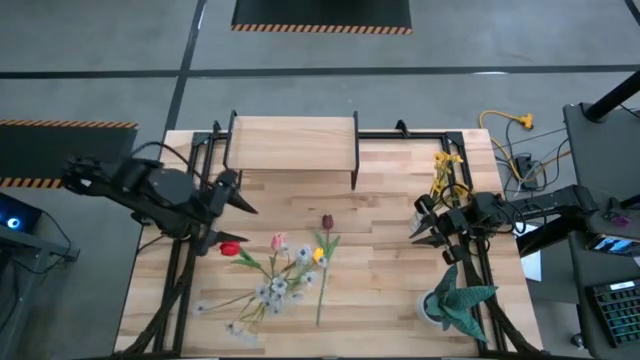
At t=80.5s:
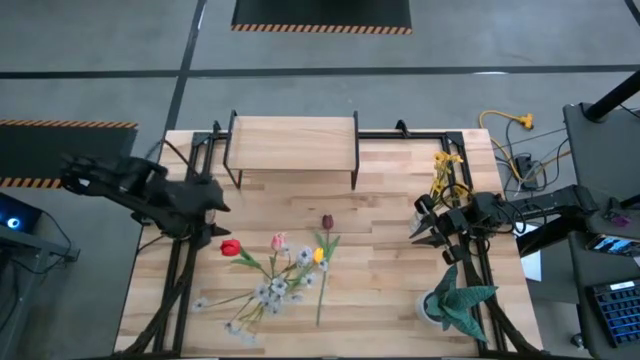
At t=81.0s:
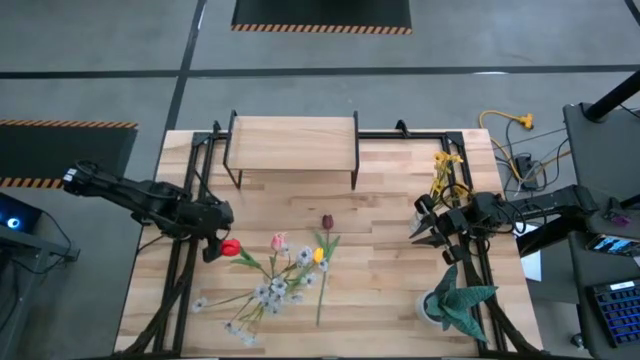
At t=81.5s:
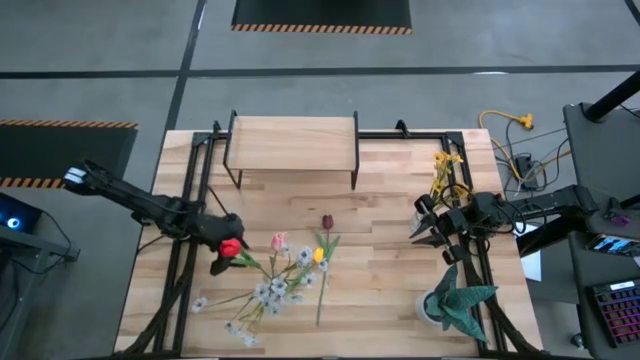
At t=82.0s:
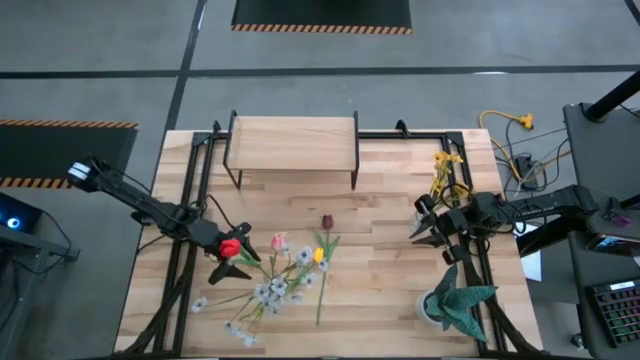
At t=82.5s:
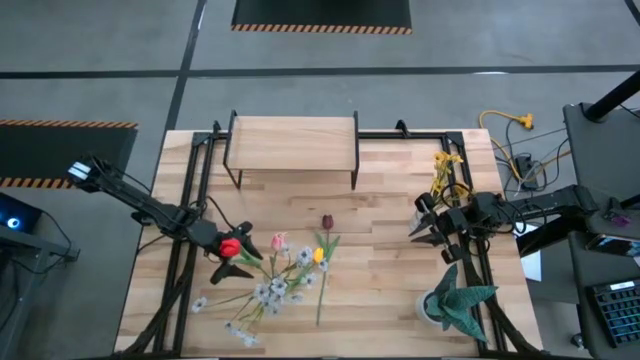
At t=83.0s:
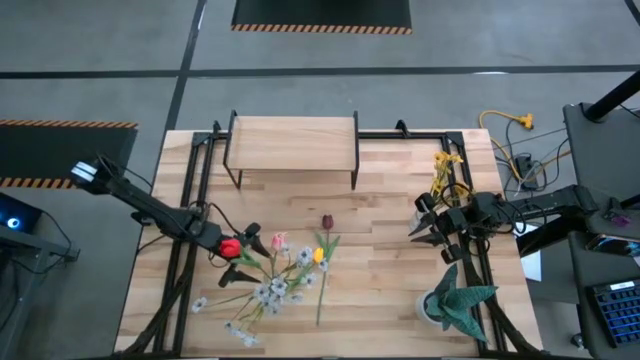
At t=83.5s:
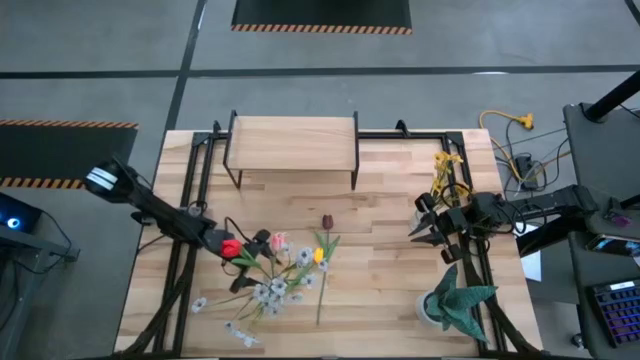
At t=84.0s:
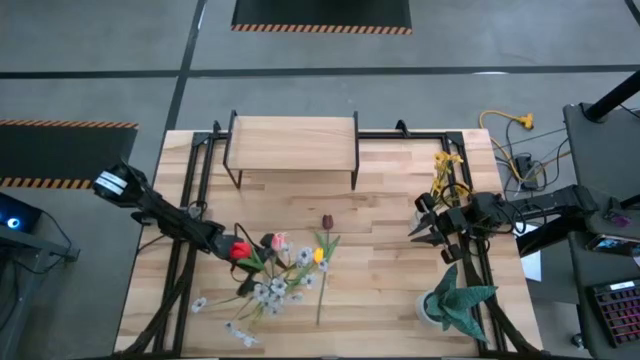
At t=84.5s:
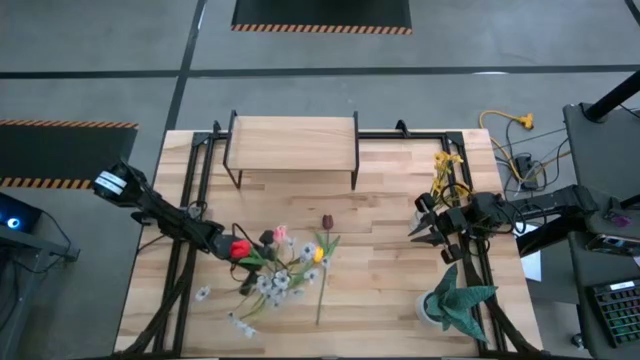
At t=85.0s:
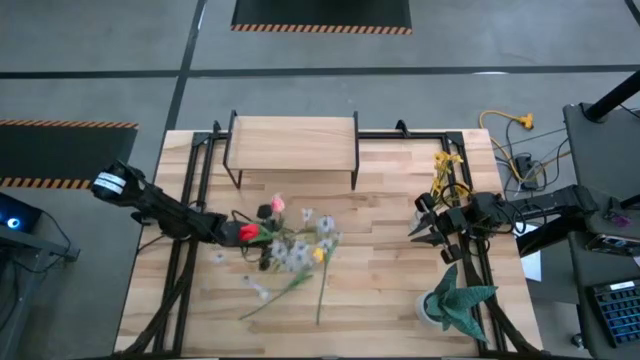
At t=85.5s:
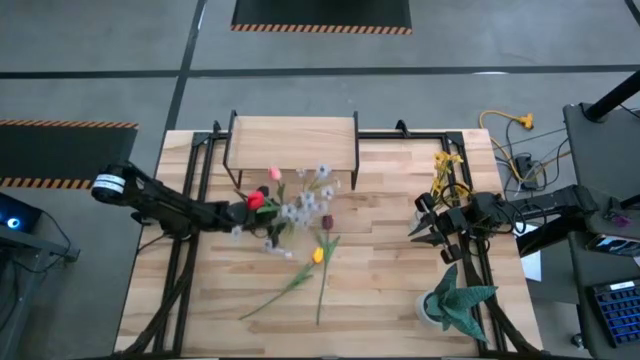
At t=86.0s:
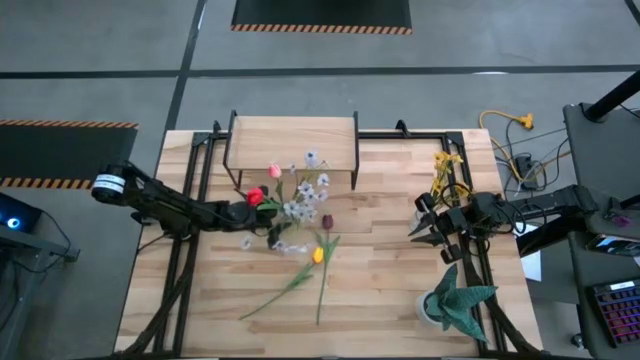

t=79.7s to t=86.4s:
Task: Pick and place flowers into a vace then onto a shelf
Move the left transparent vase to the center

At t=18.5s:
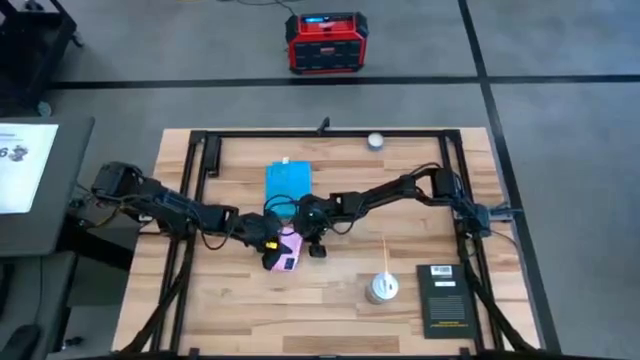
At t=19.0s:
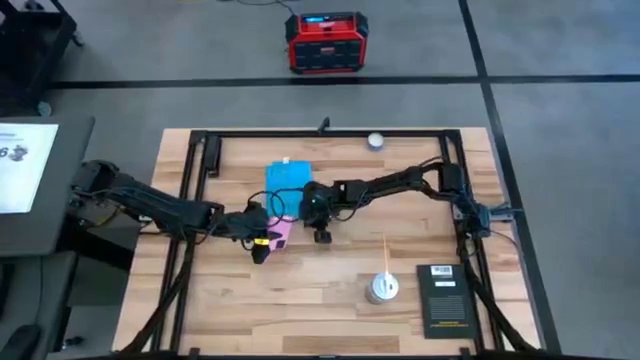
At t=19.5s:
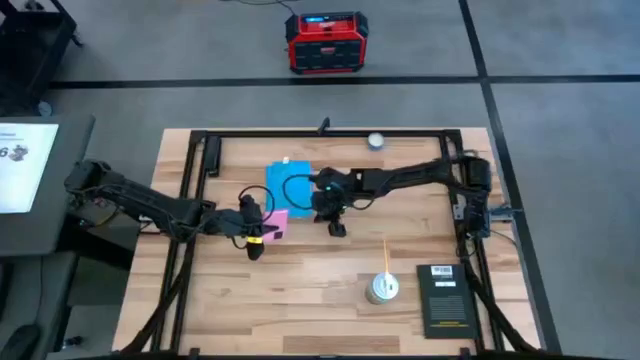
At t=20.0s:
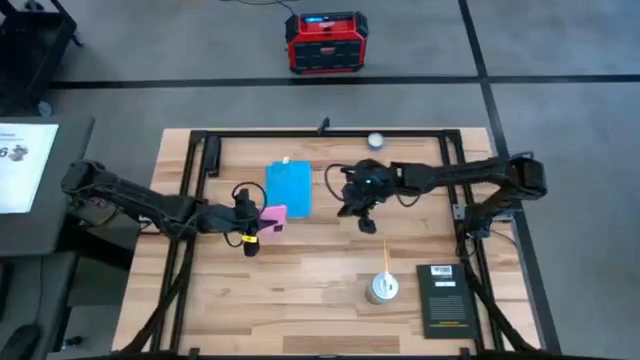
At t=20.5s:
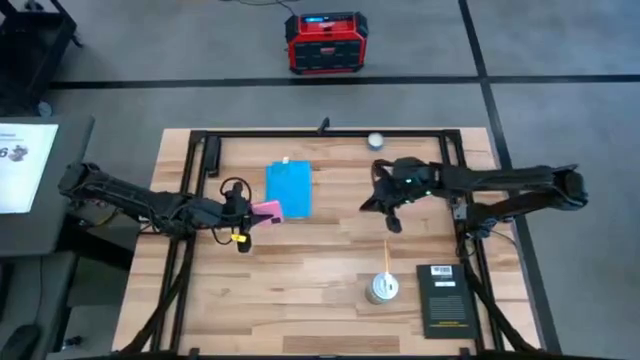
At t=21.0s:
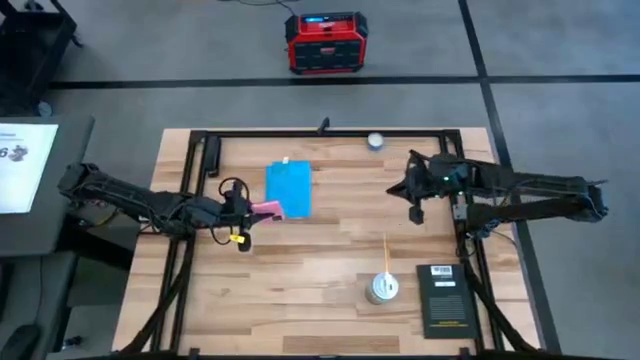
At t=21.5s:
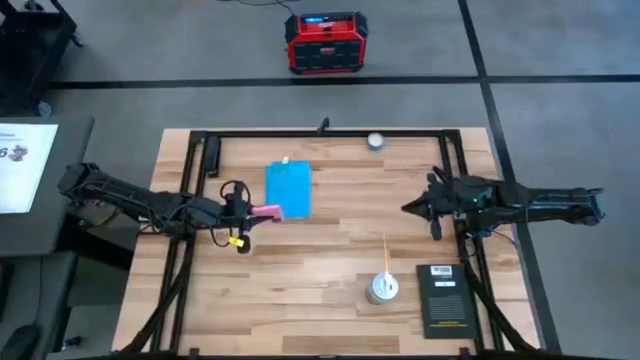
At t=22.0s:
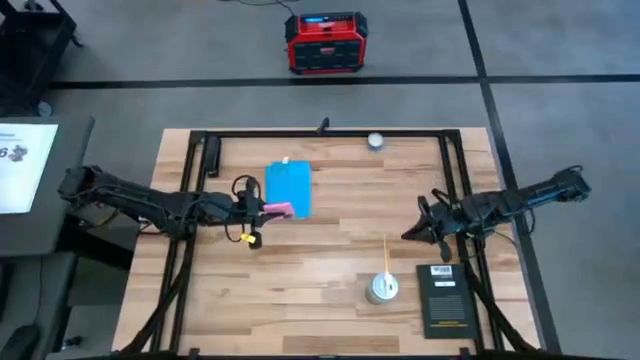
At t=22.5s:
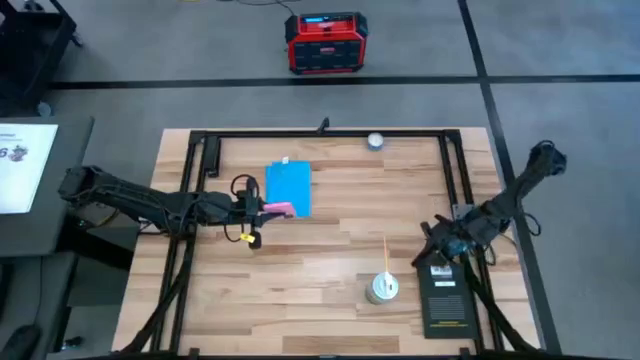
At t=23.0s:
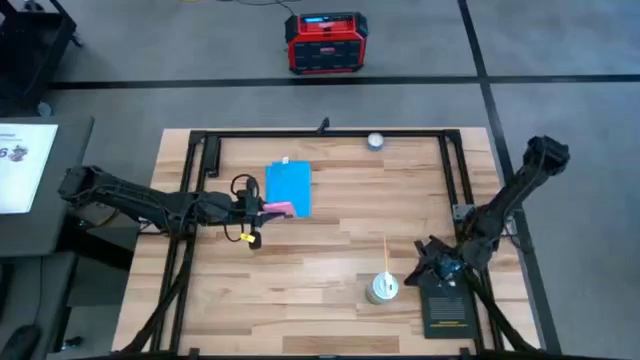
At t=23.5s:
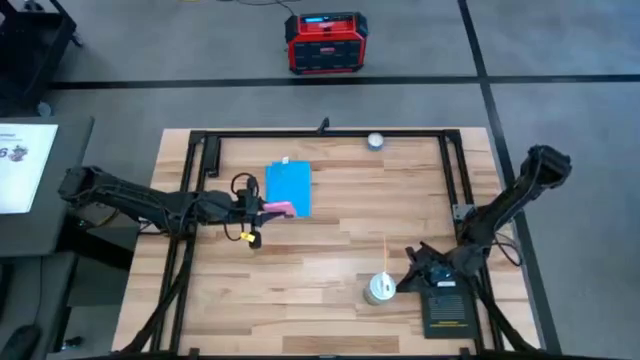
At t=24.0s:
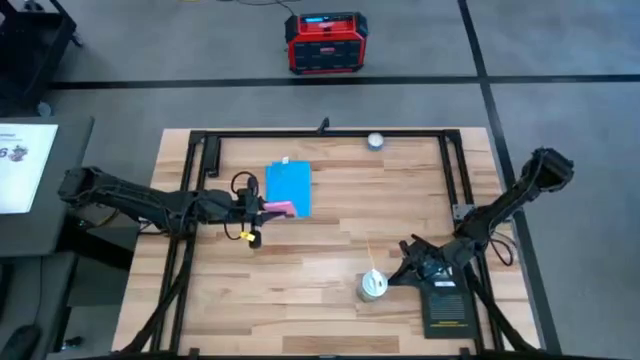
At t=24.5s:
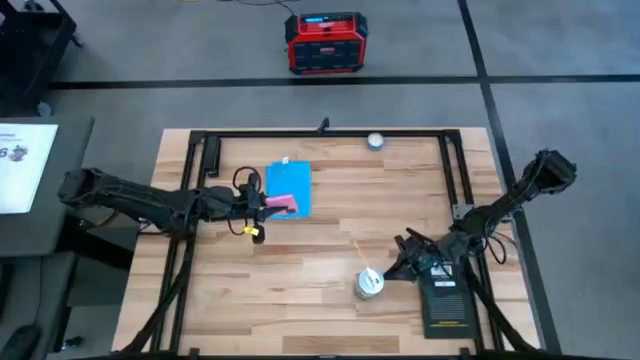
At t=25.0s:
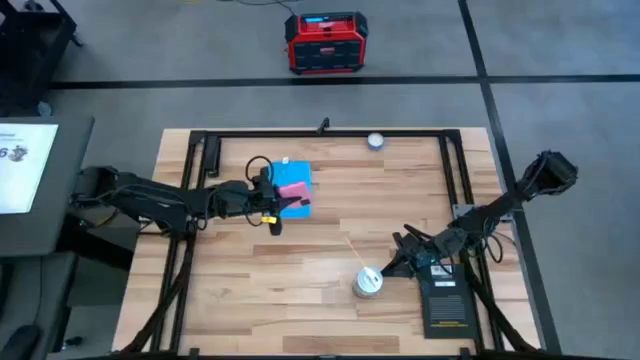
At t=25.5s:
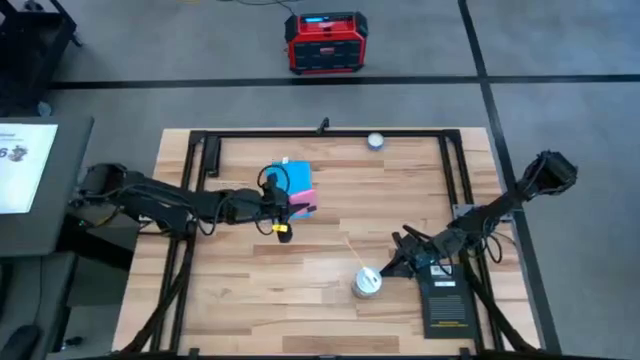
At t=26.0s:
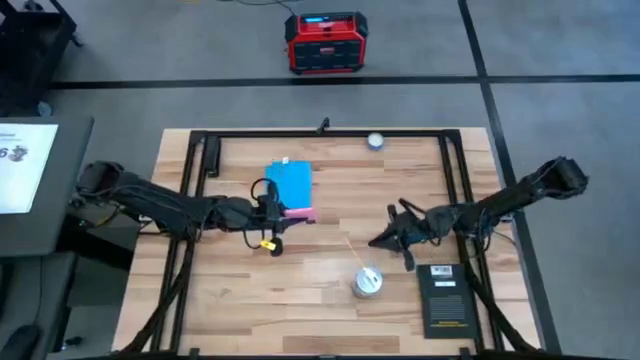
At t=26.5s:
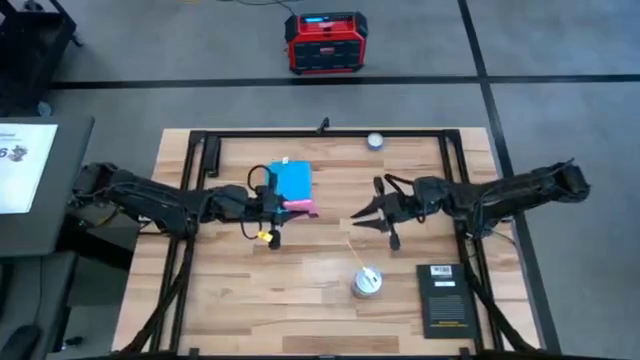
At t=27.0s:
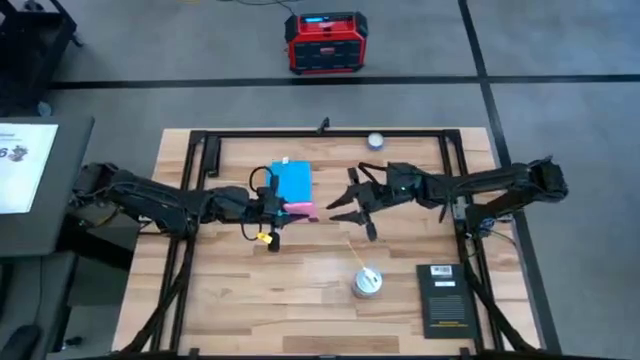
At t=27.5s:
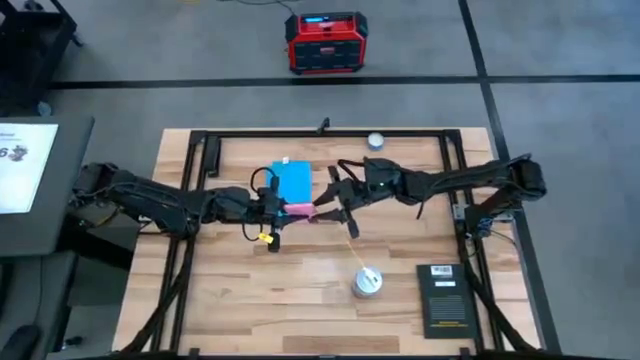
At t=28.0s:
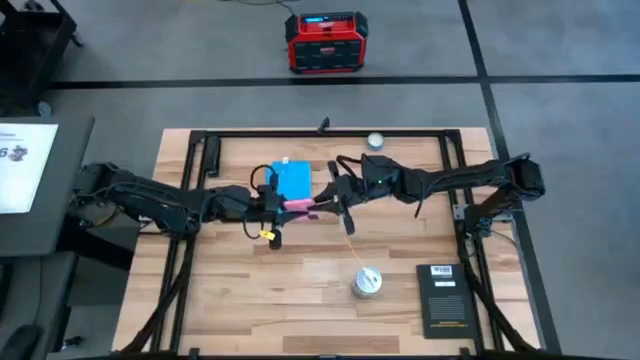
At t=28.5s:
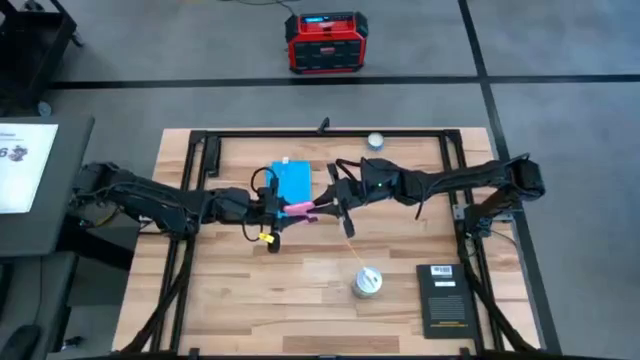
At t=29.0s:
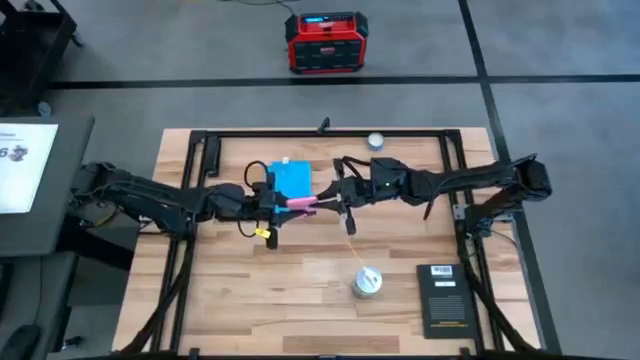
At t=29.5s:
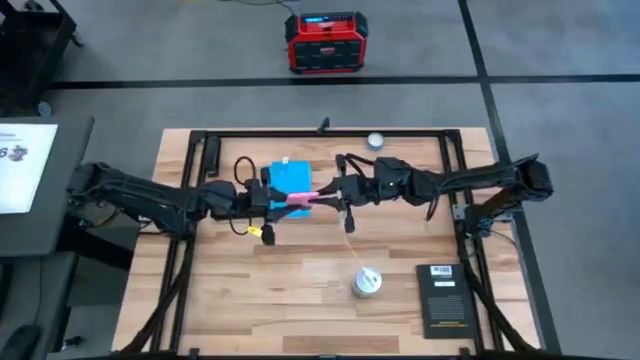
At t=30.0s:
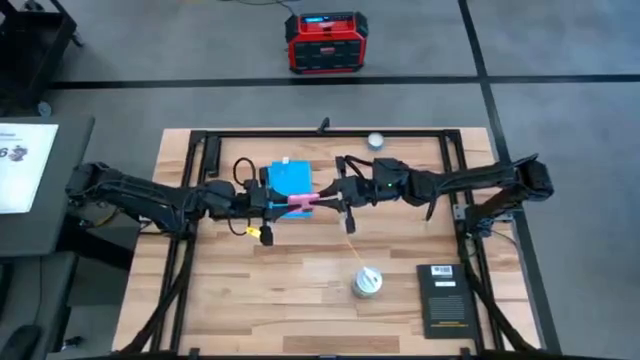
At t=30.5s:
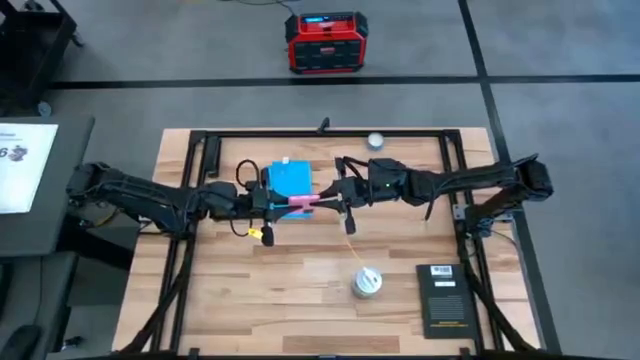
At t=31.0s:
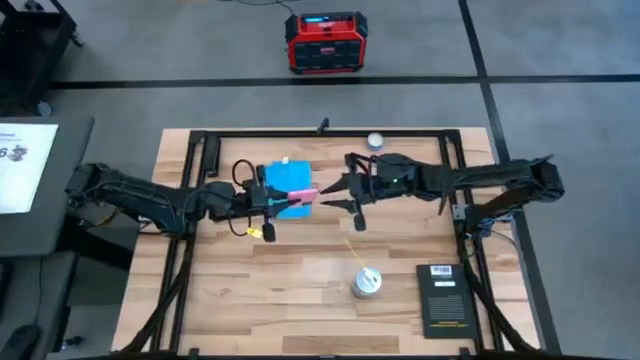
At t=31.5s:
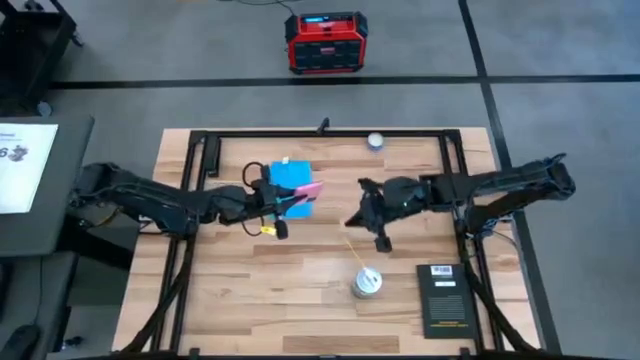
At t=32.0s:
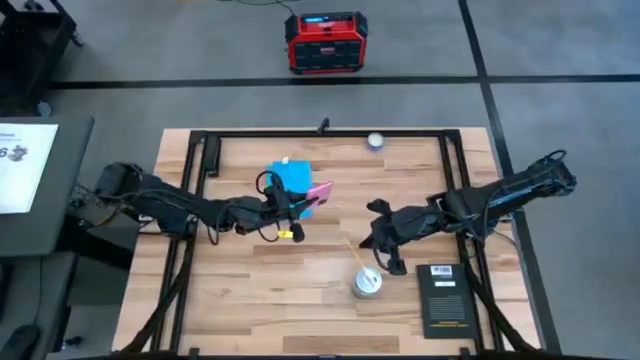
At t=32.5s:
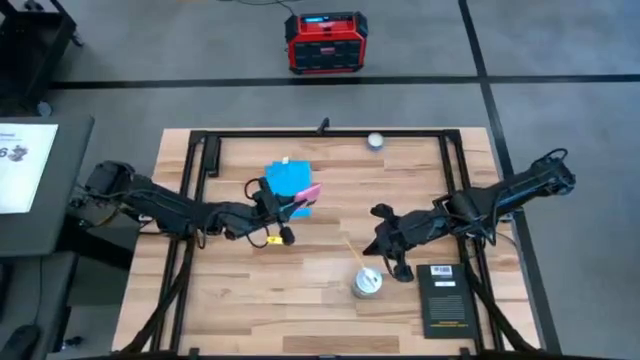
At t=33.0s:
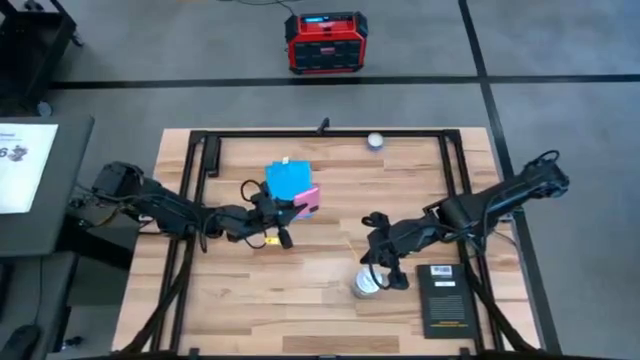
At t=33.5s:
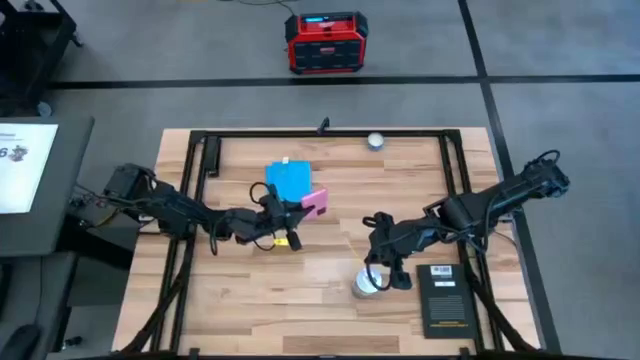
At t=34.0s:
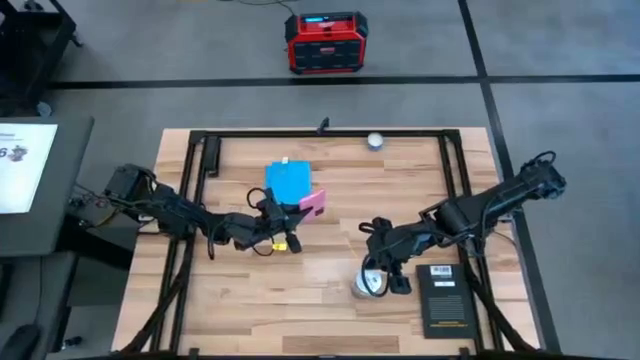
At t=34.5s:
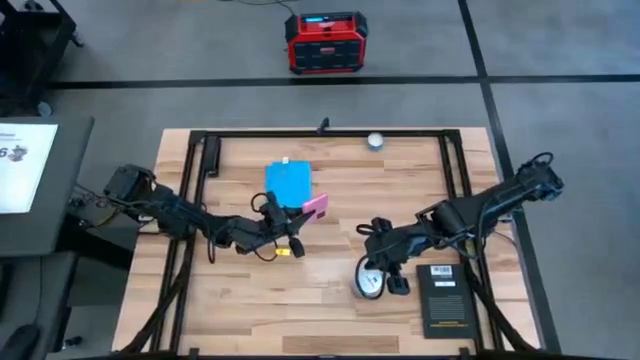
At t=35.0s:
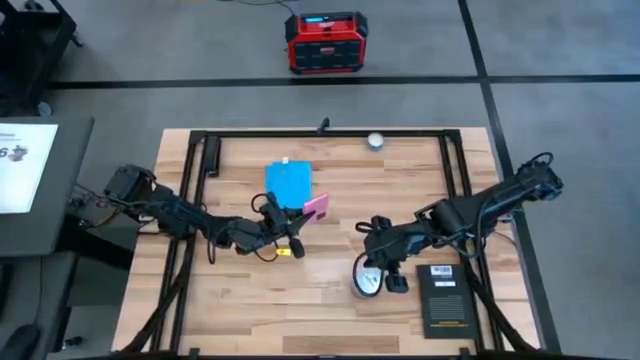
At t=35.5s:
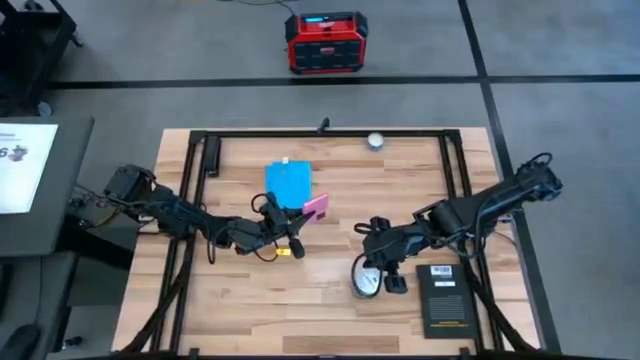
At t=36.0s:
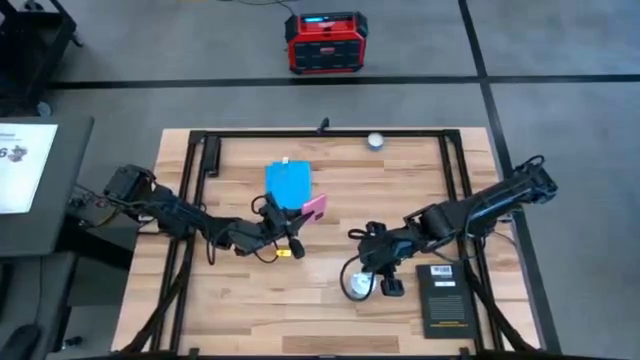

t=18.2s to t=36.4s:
Task: Apply microfiber cloth
Spray the device using the spray bottle
